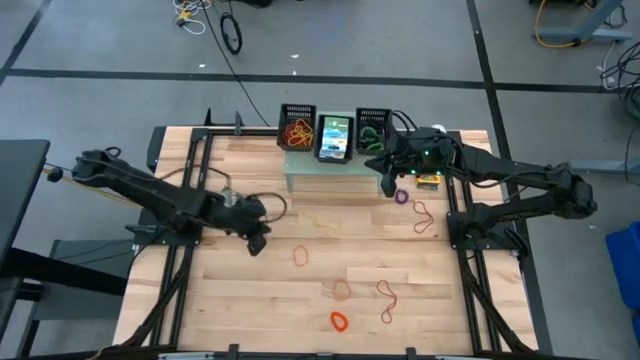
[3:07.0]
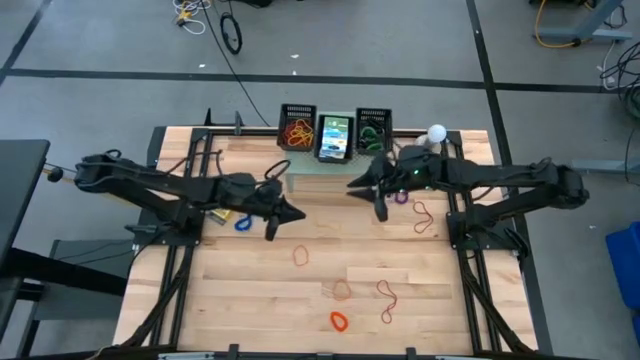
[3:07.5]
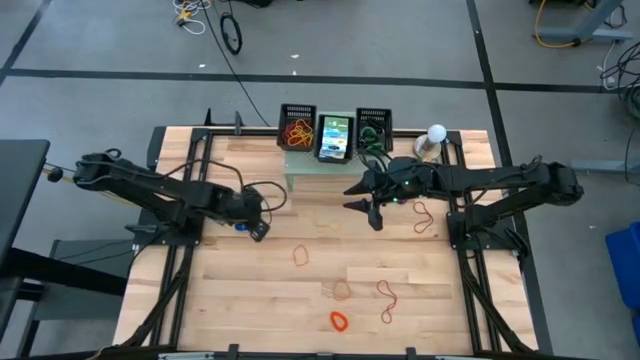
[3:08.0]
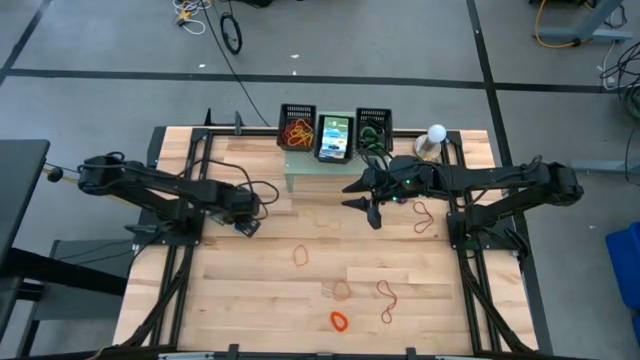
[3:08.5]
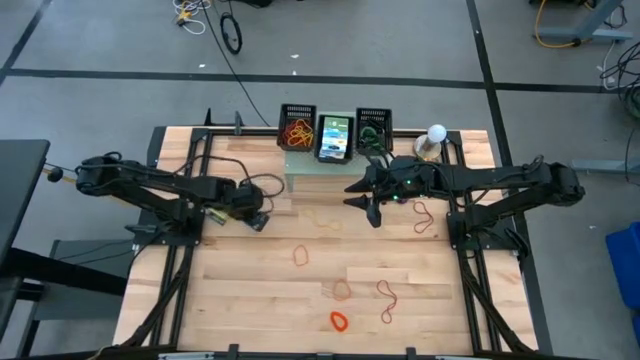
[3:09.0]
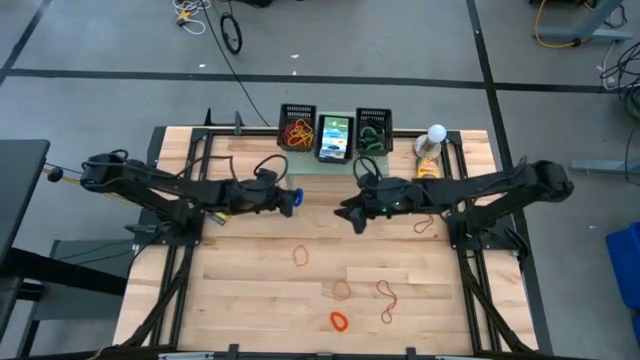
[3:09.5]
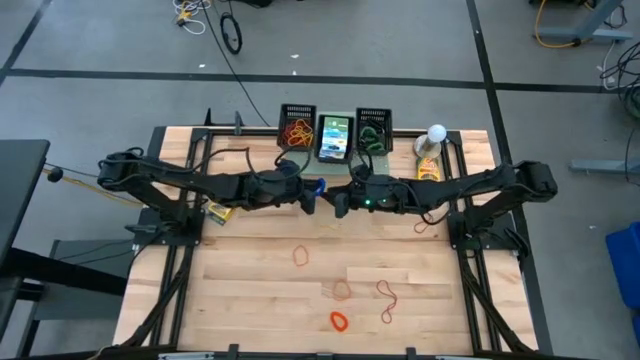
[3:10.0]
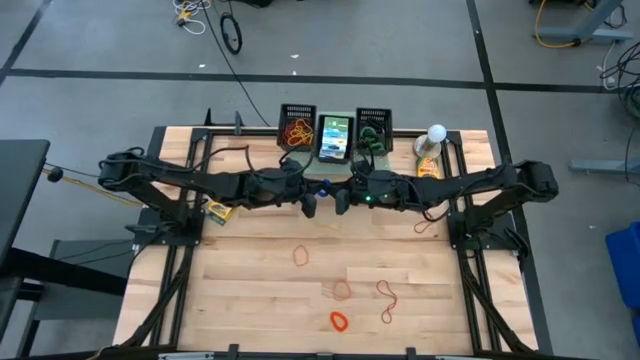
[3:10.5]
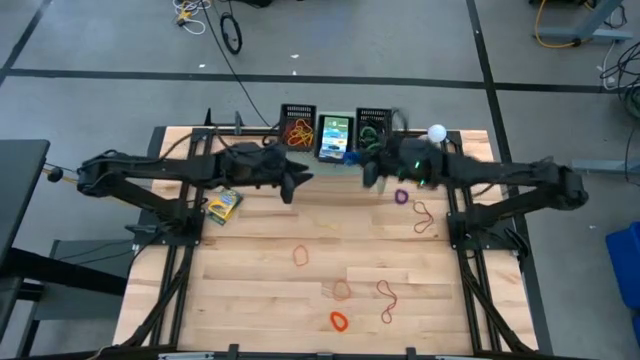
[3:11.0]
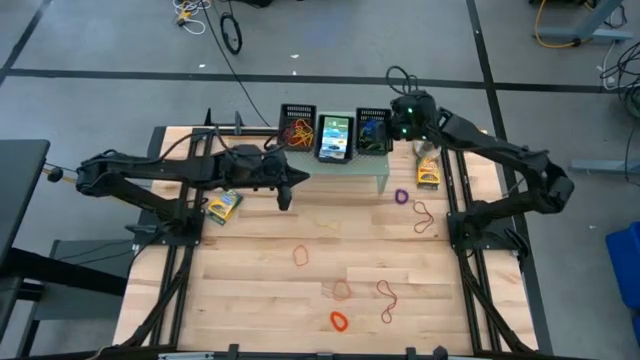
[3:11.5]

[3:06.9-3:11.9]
Task: Pick & Place Office Desk Supplies
Put the blue spring bracelet into the right black bin on the shelf

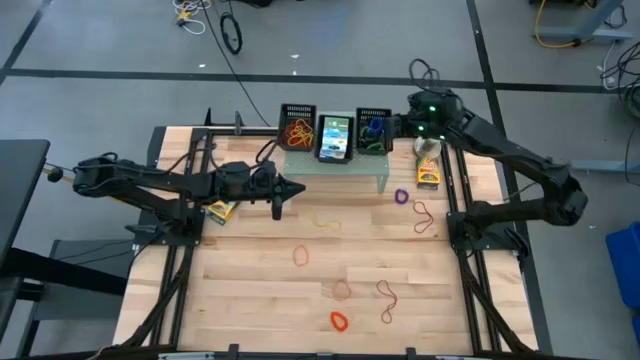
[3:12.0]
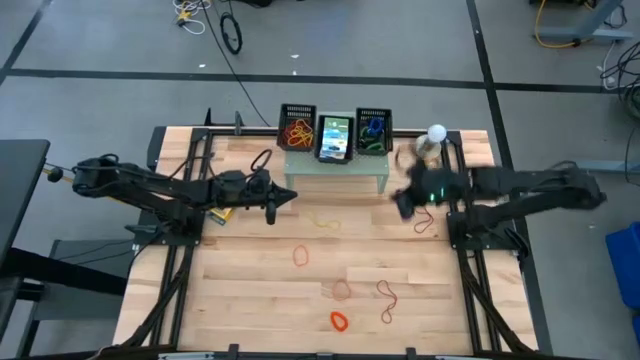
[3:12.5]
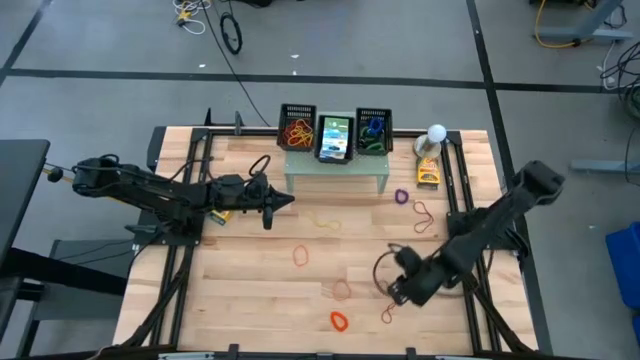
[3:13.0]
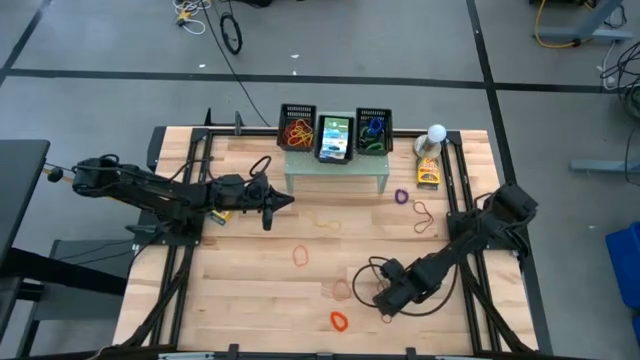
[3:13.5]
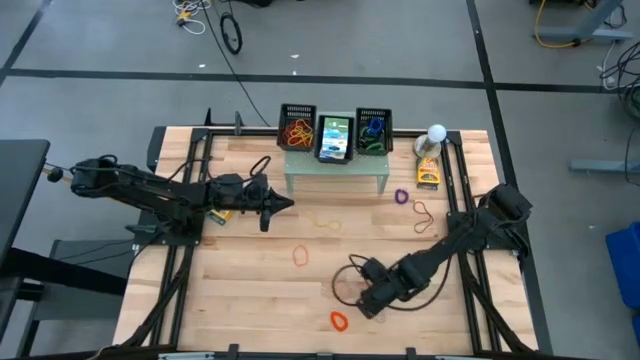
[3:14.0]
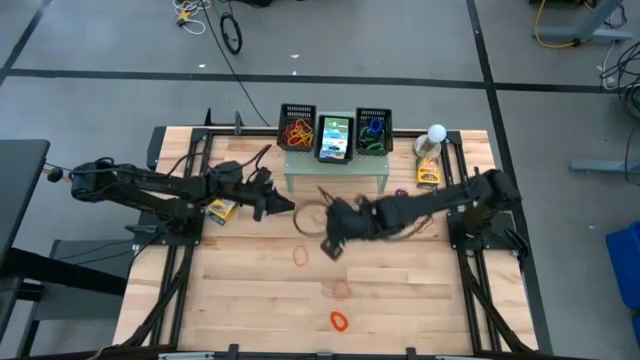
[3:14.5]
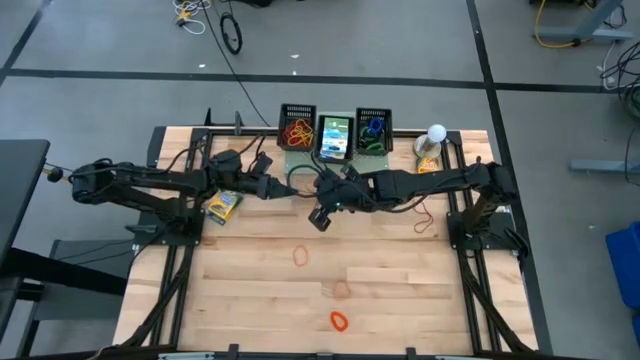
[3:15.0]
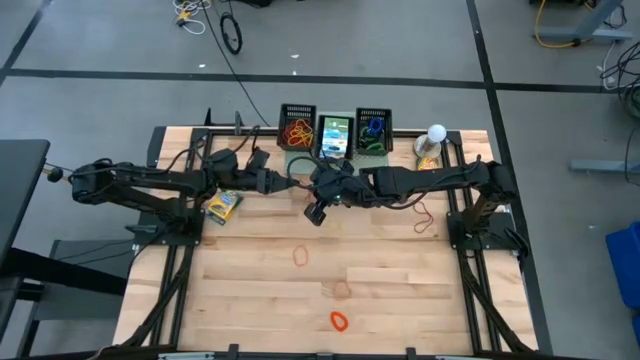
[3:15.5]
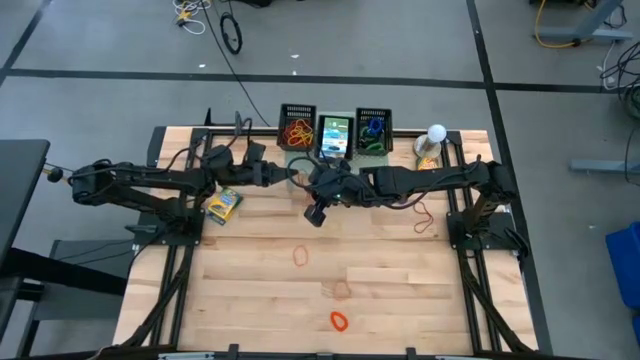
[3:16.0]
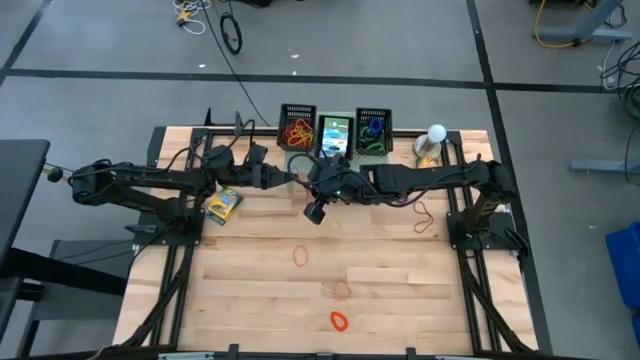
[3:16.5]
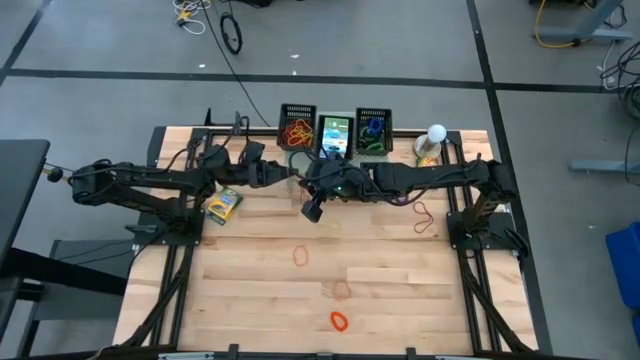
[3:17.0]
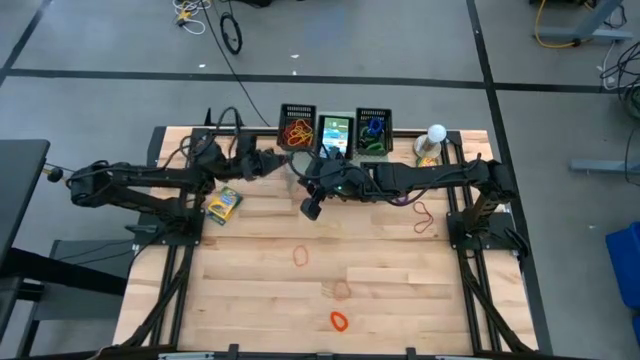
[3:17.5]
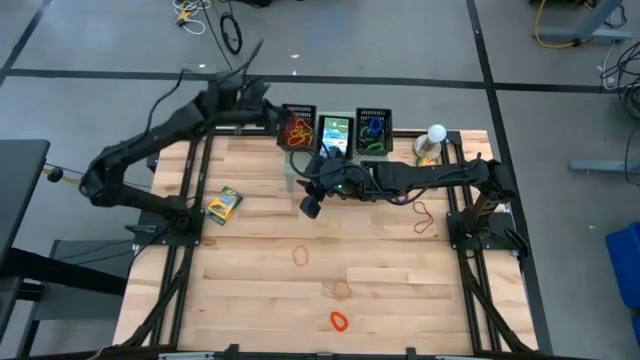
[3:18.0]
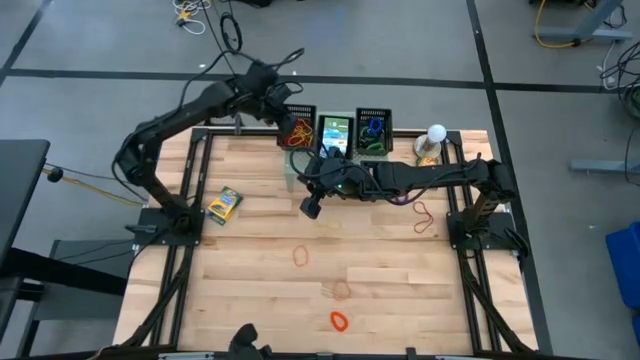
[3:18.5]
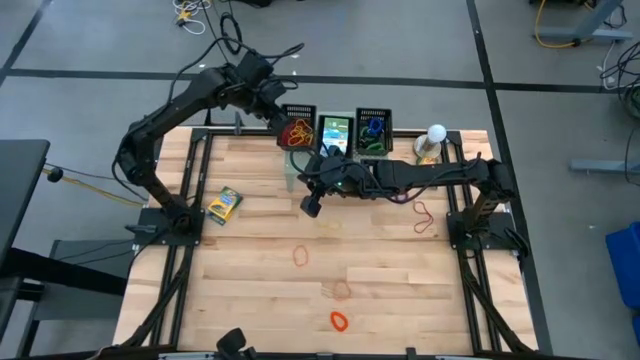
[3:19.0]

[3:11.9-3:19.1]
Put the red rubber band into the left black bin on the shelf

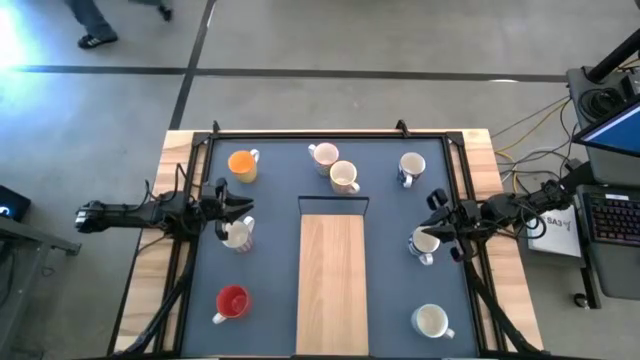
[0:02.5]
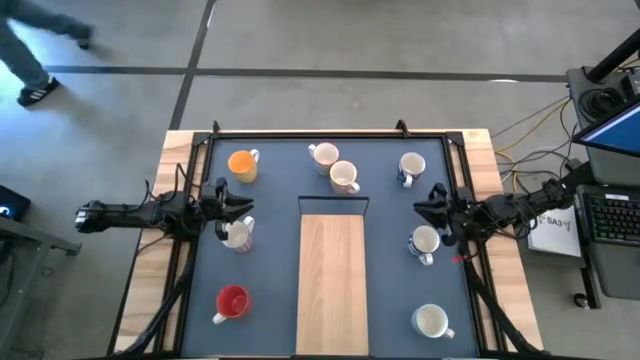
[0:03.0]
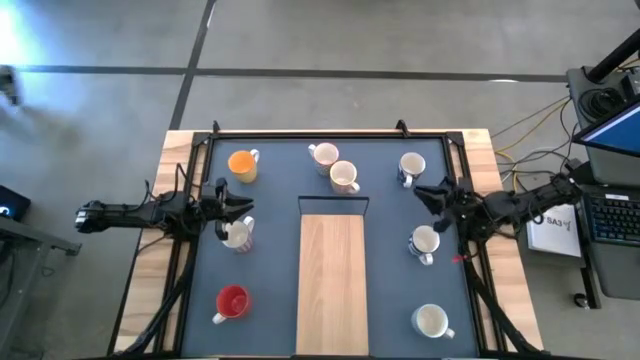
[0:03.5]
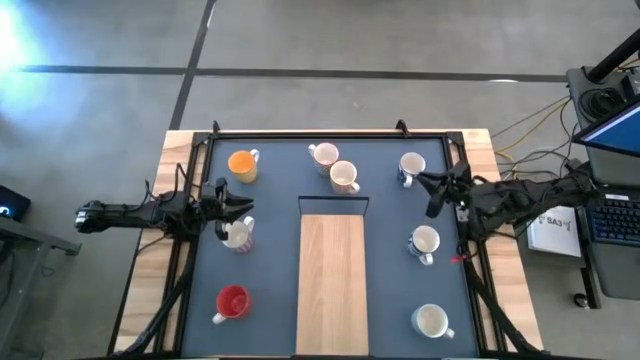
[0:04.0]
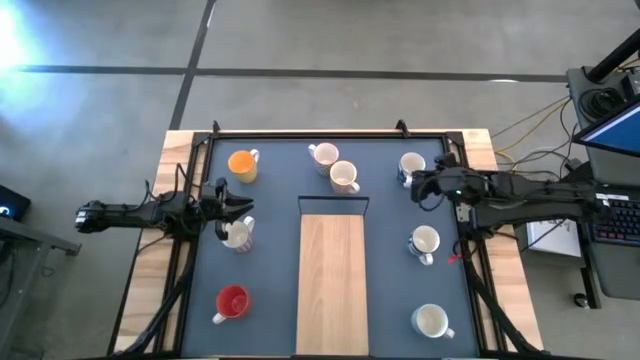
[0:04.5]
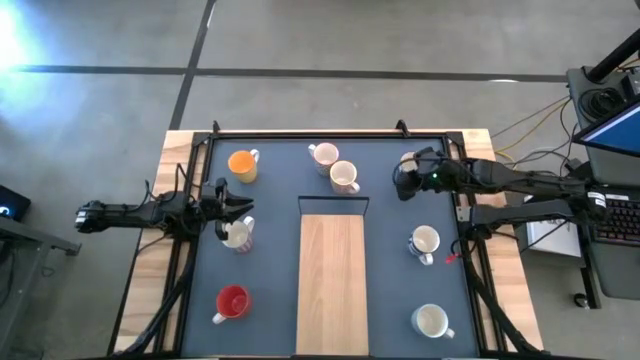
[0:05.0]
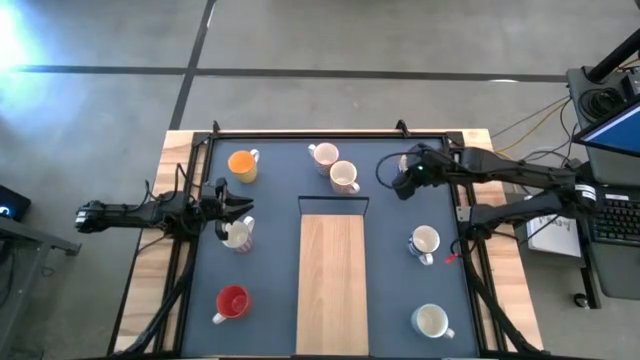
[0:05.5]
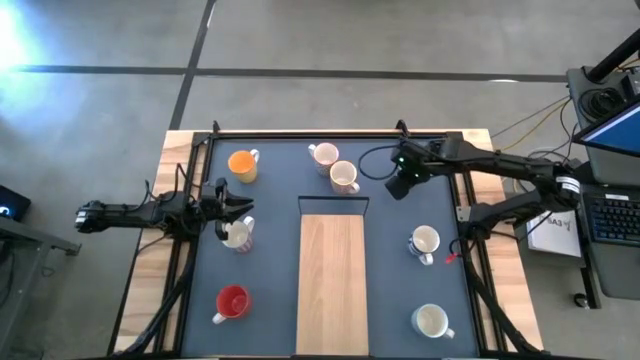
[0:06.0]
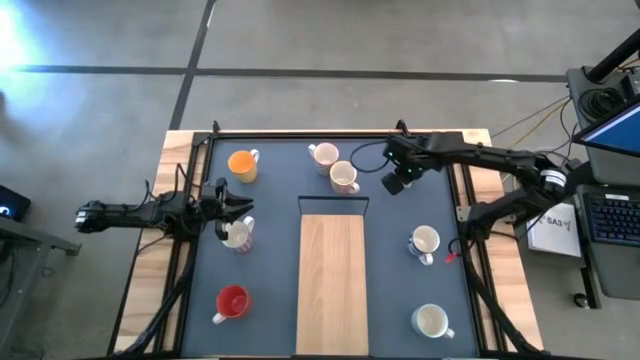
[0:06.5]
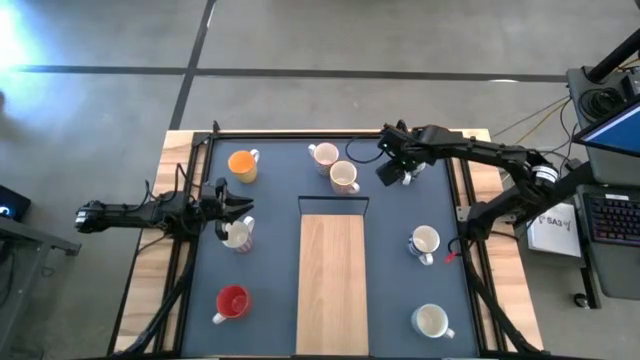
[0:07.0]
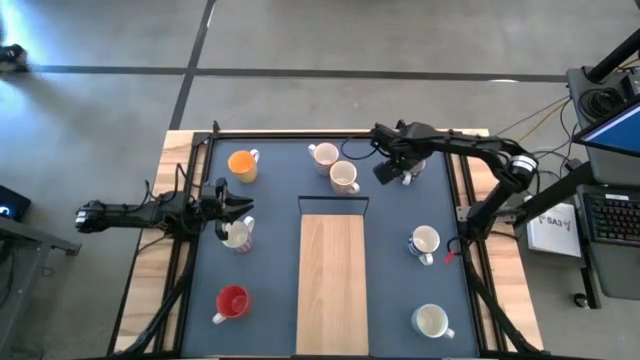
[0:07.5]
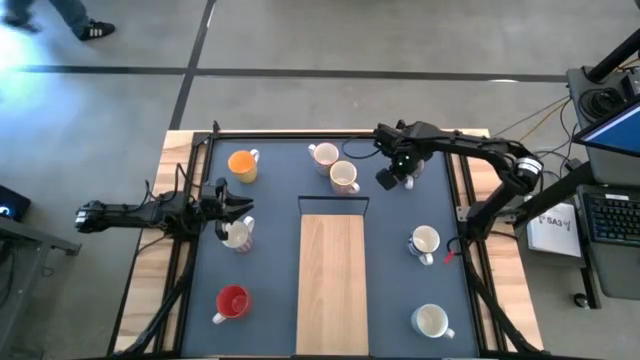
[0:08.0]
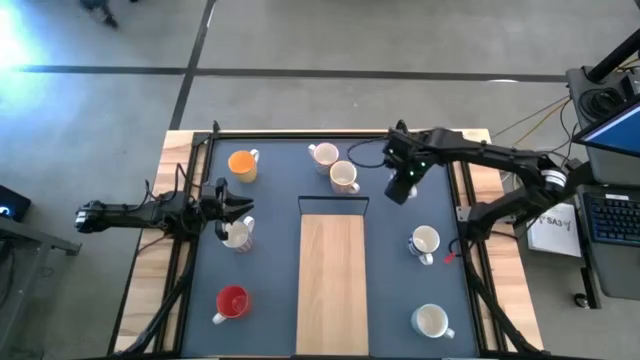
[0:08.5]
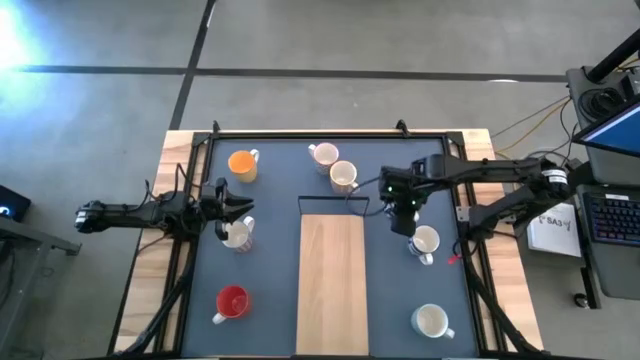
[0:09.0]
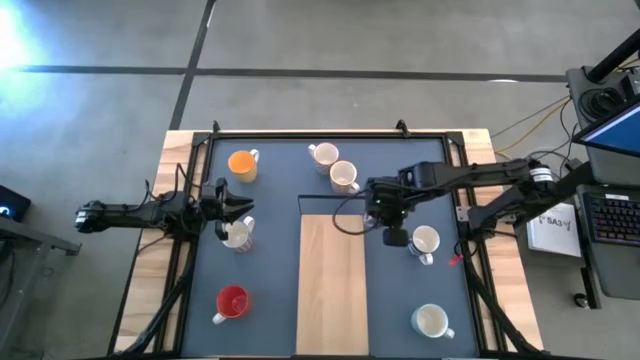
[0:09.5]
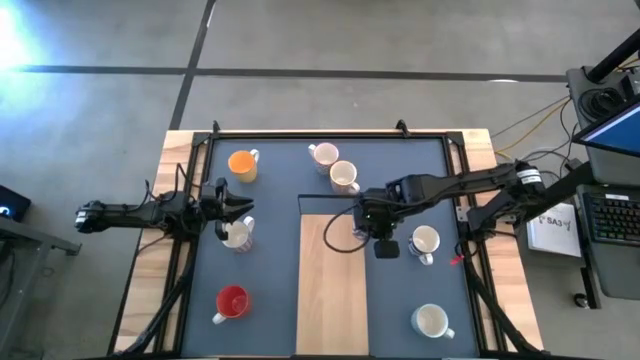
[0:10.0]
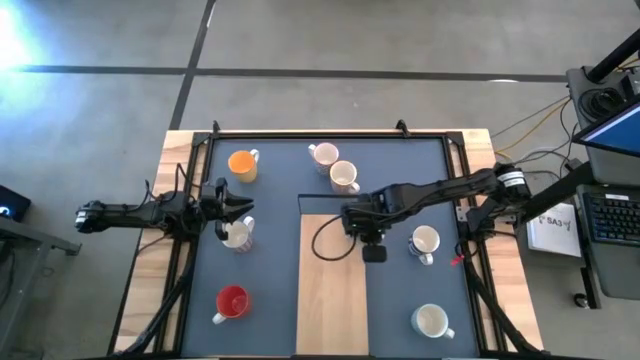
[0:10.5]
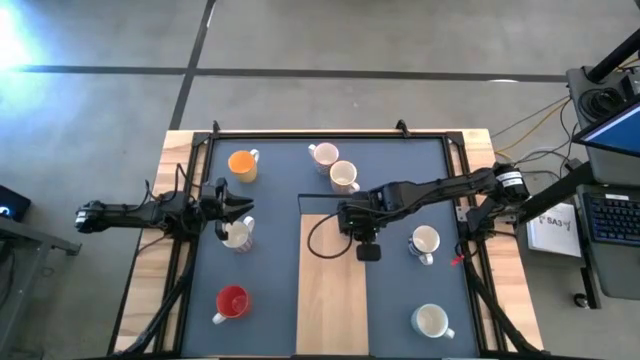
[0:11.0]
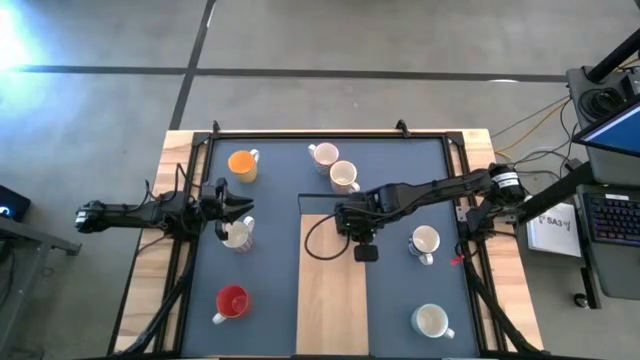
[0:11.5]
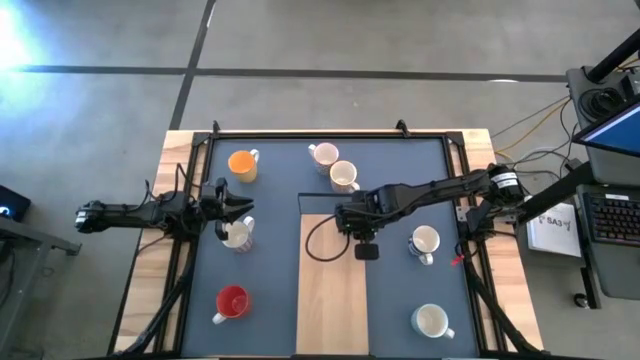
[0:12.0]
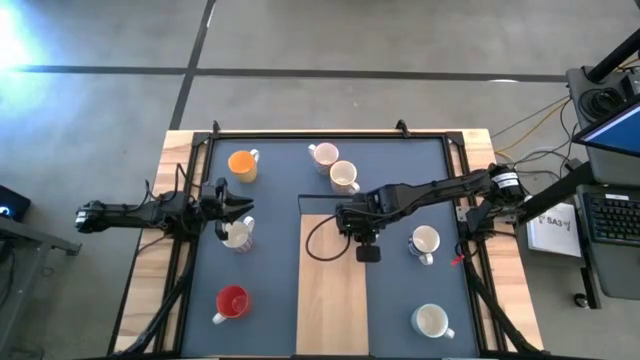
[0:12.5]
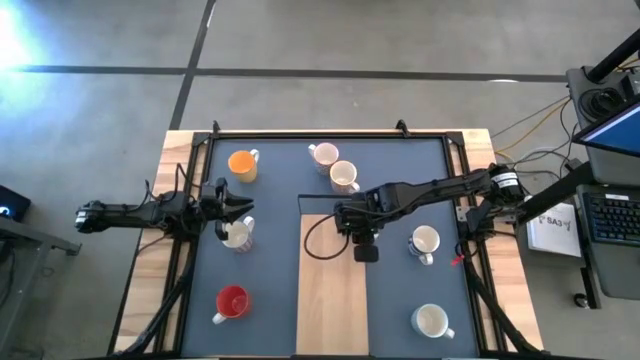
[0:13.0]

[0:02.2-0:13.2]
Task: Place coffee mugs
Put the top right blue mug on the shelf
